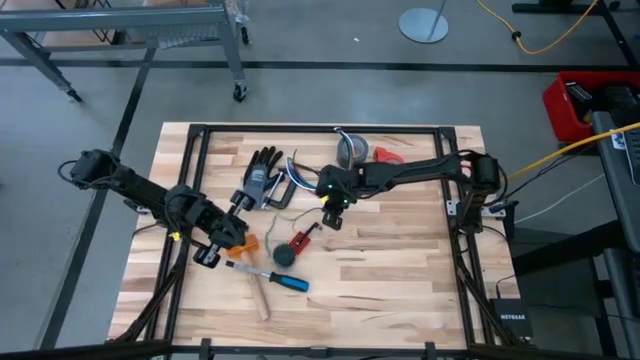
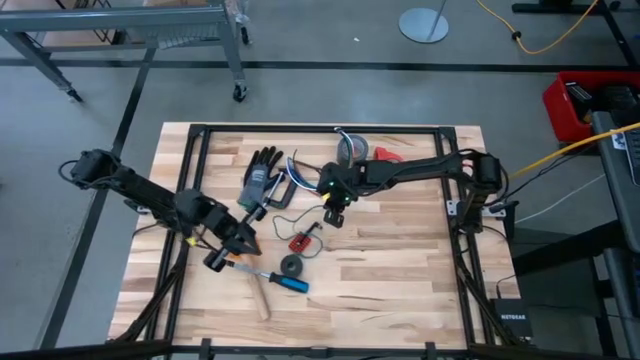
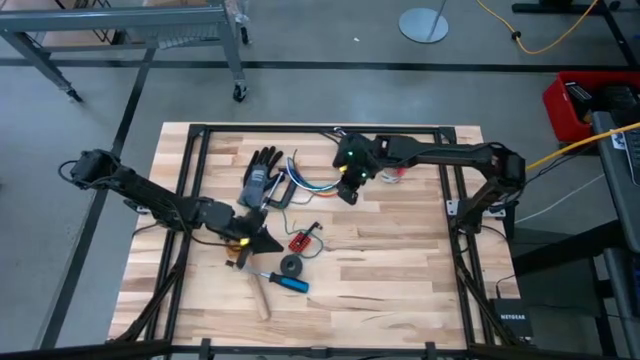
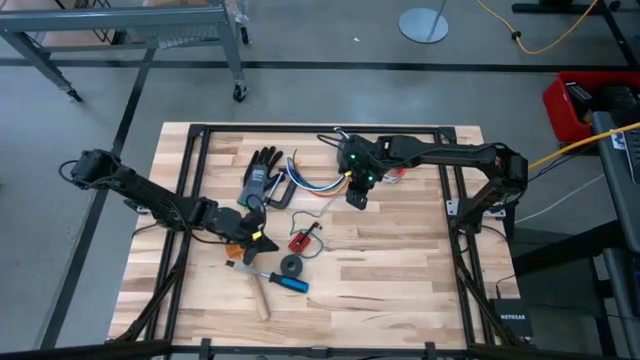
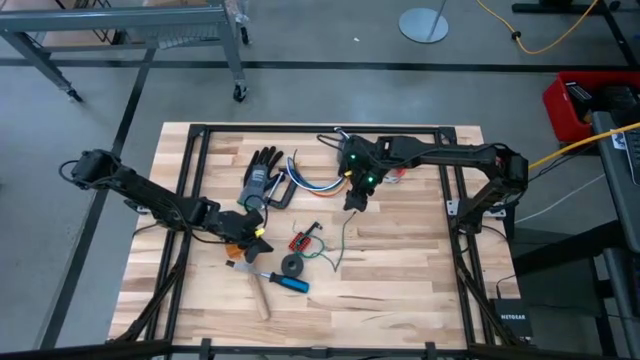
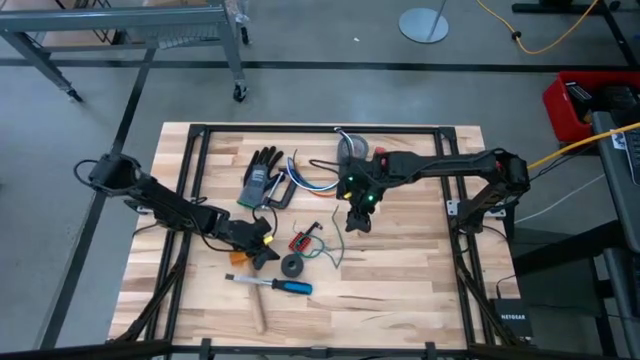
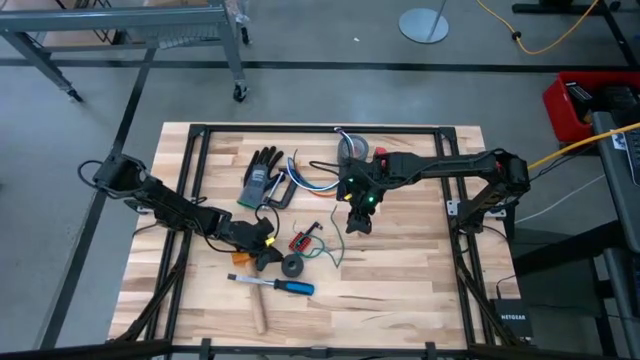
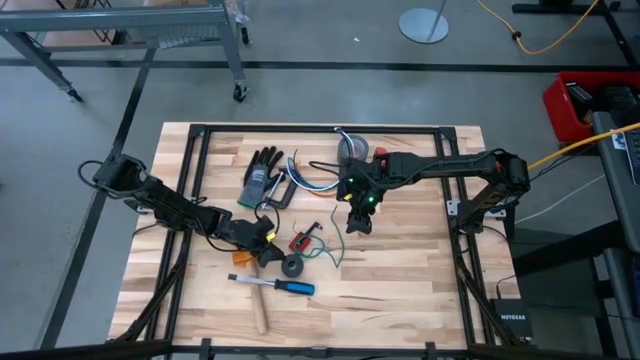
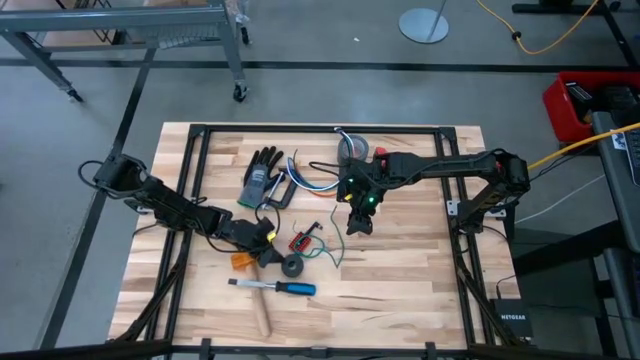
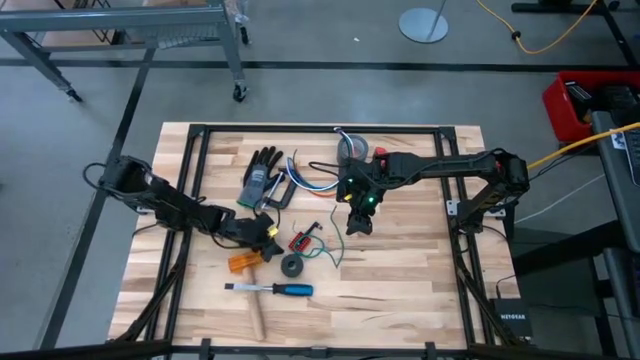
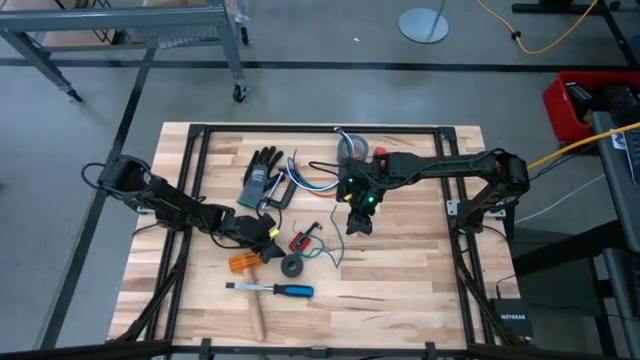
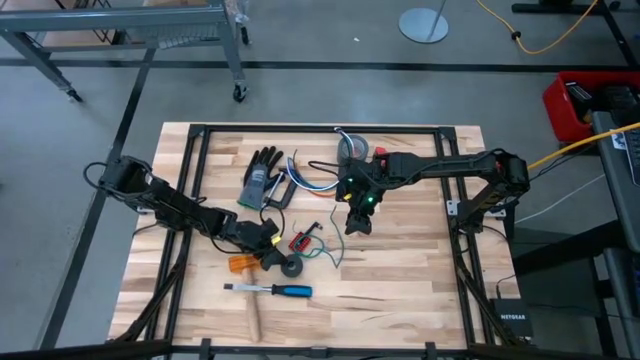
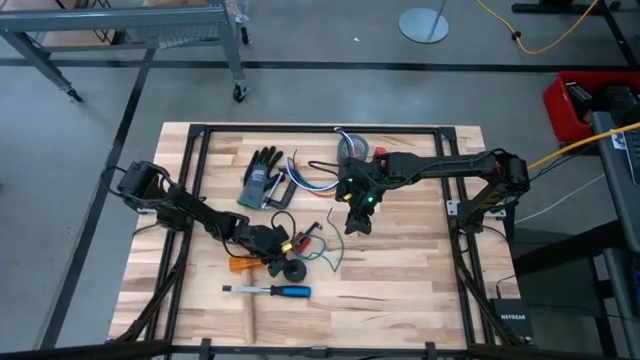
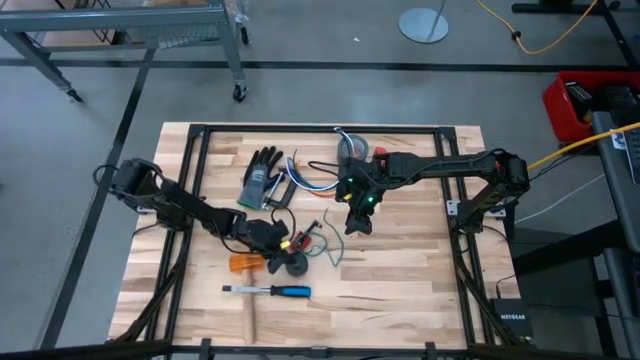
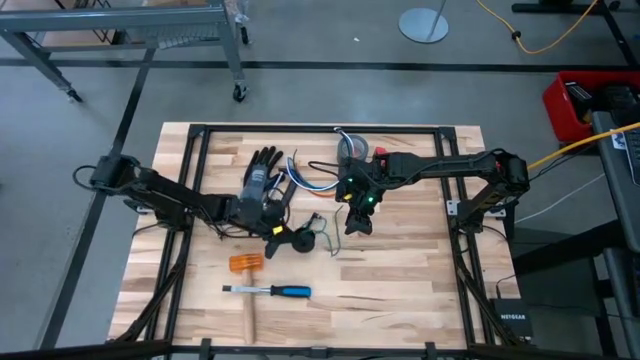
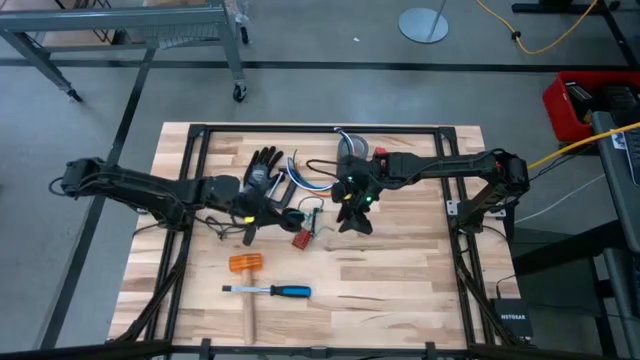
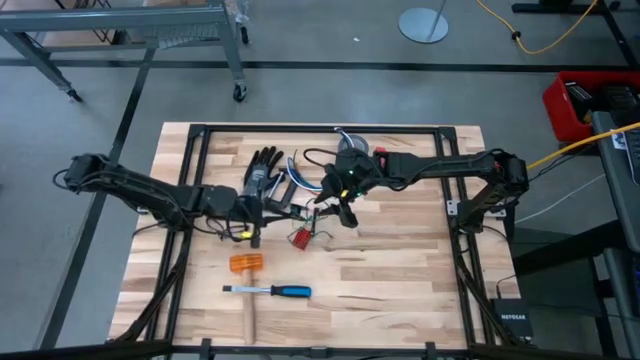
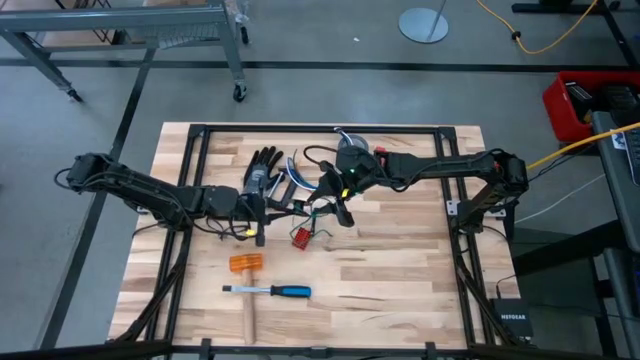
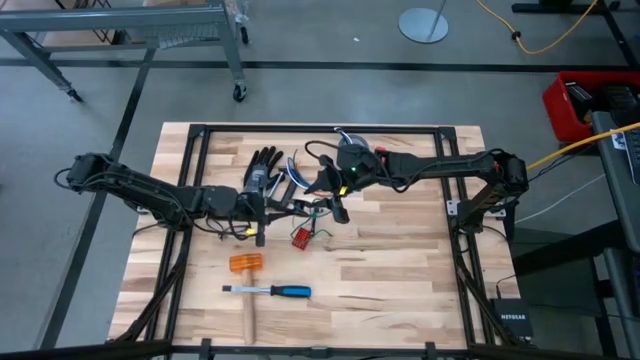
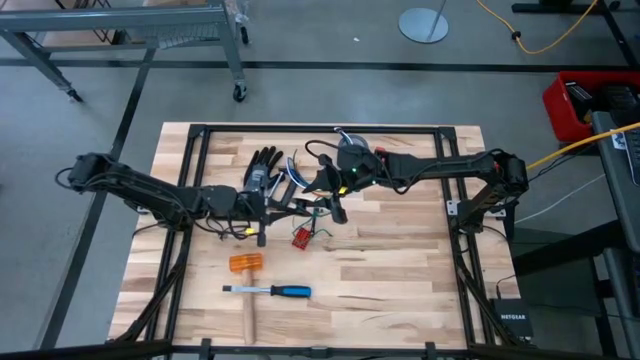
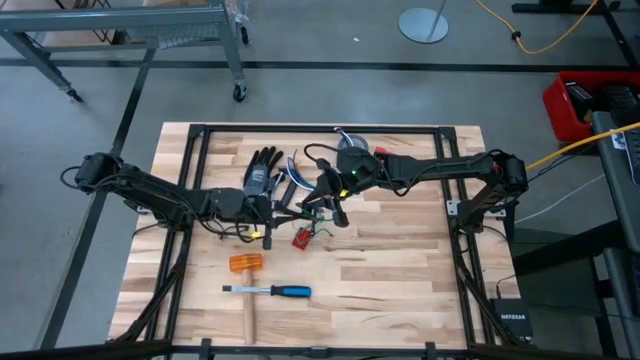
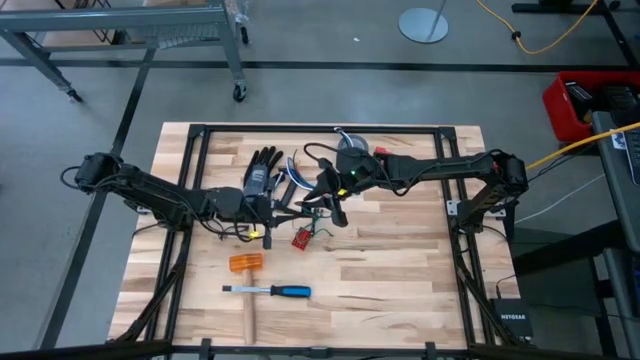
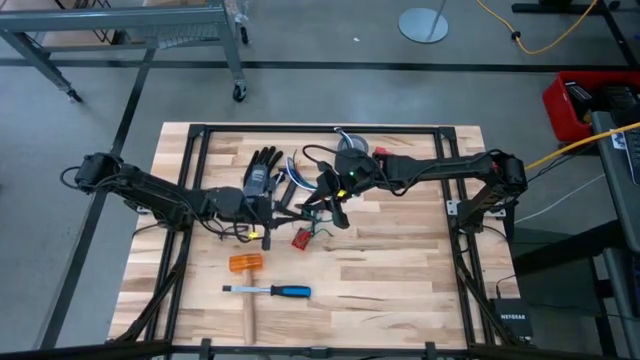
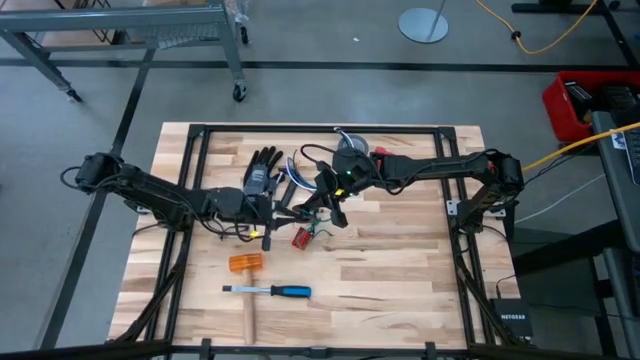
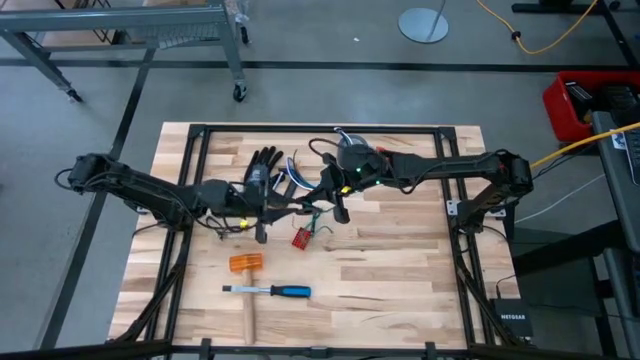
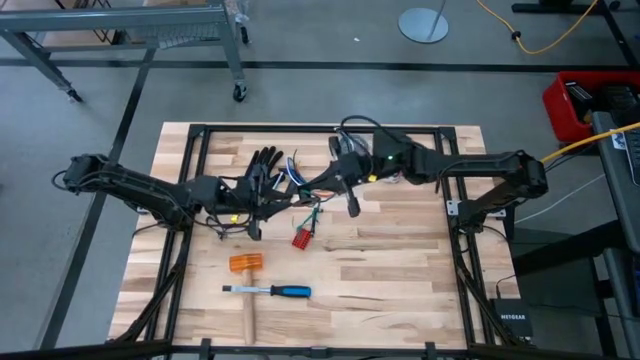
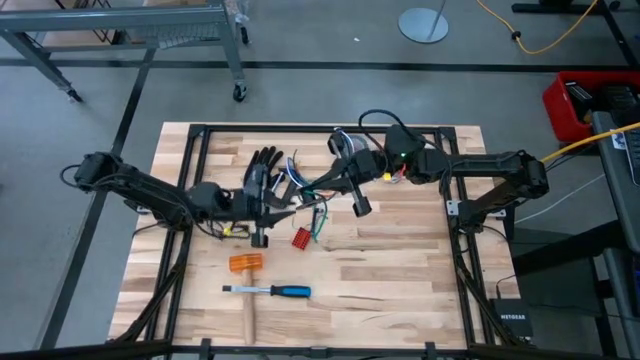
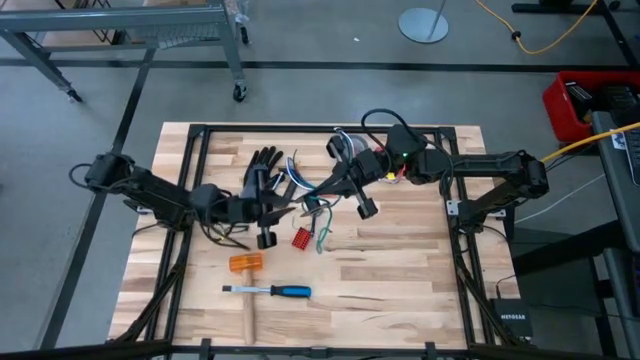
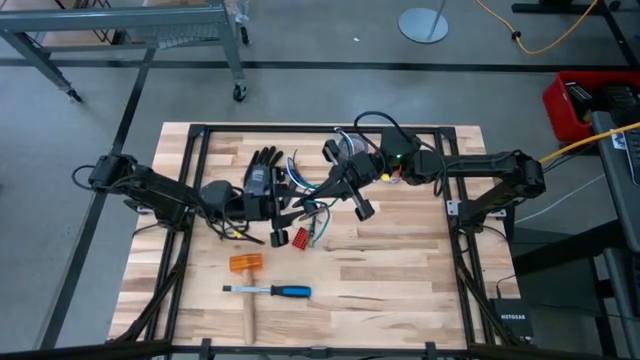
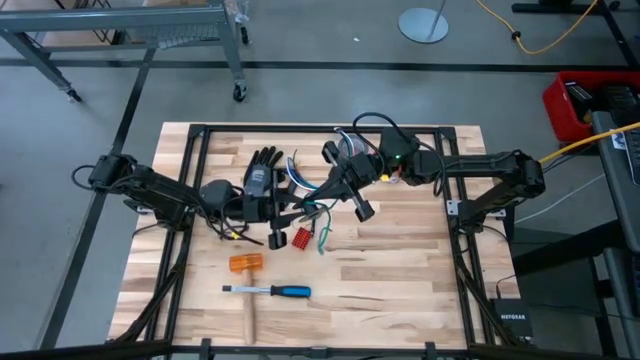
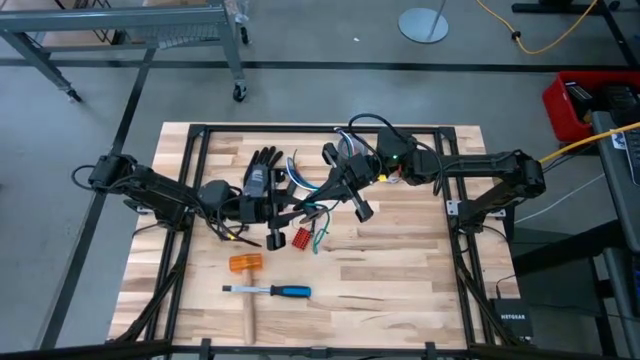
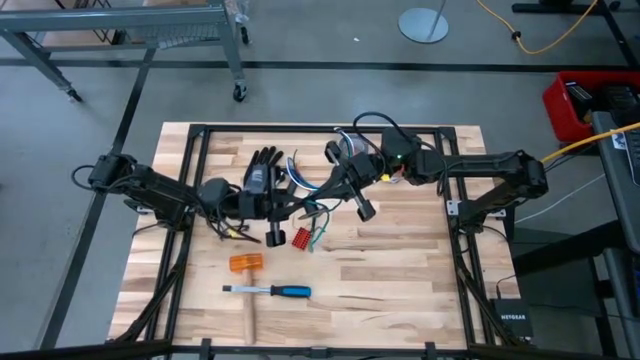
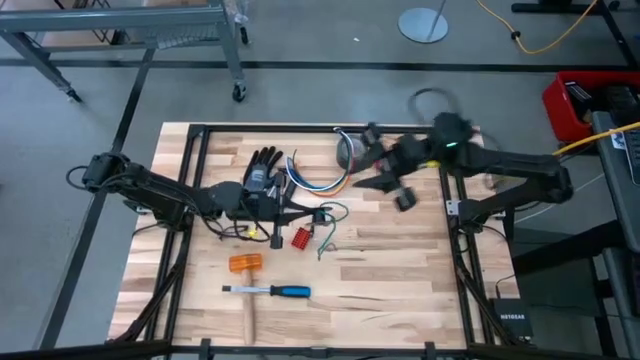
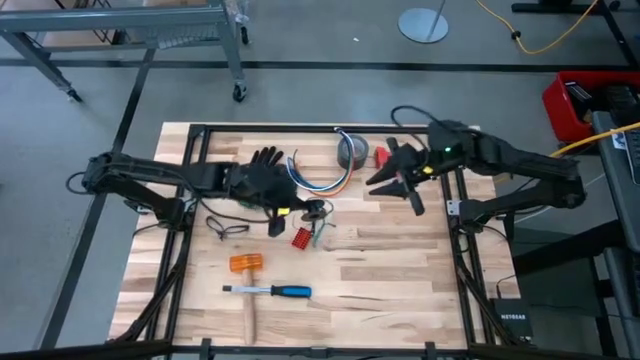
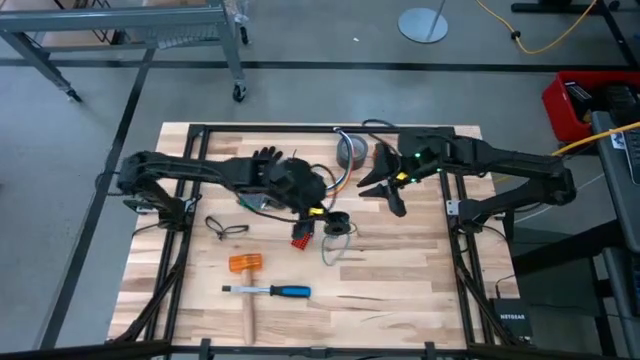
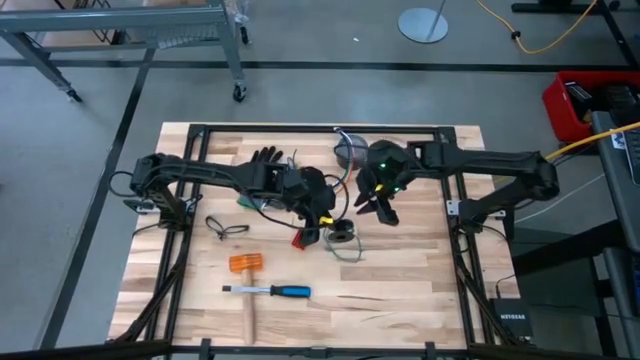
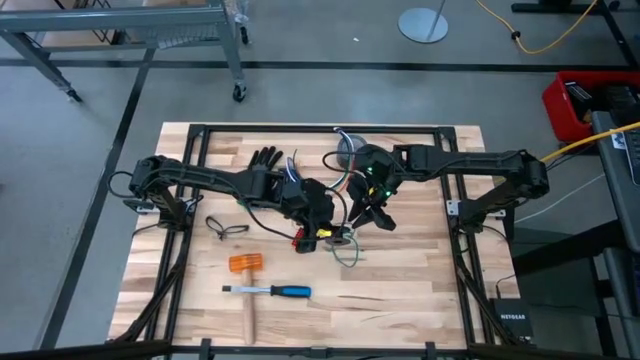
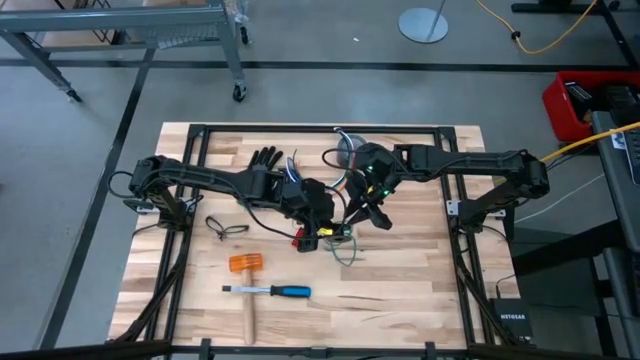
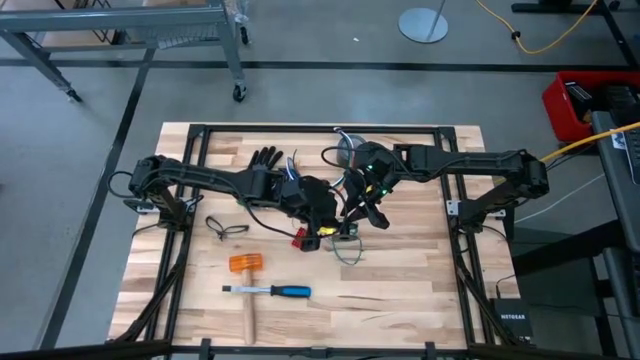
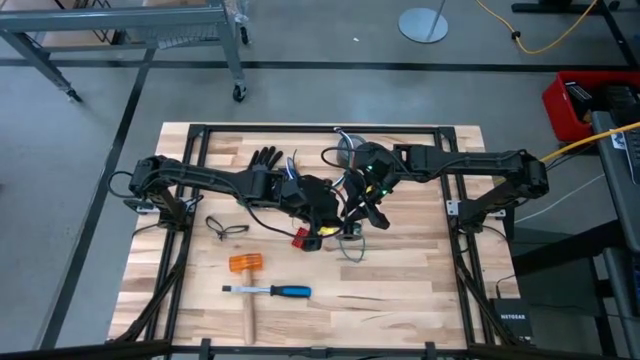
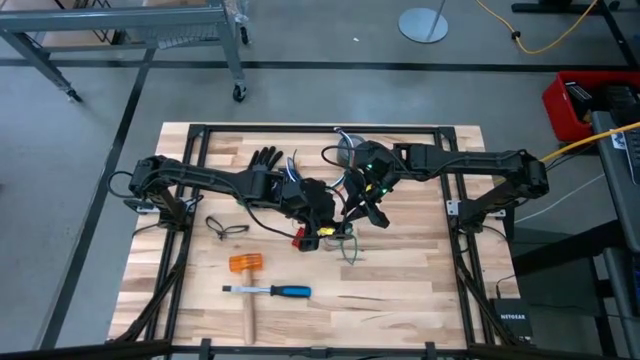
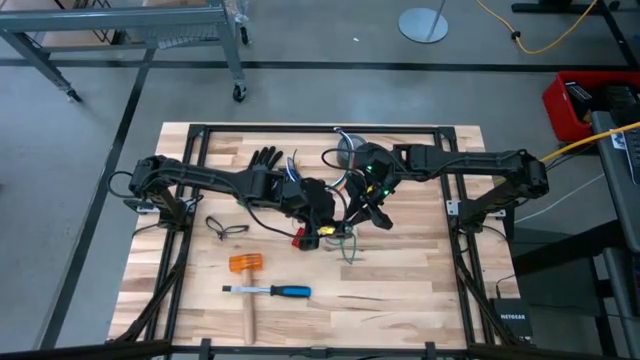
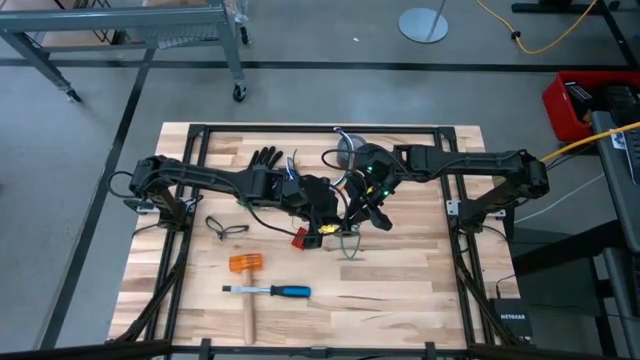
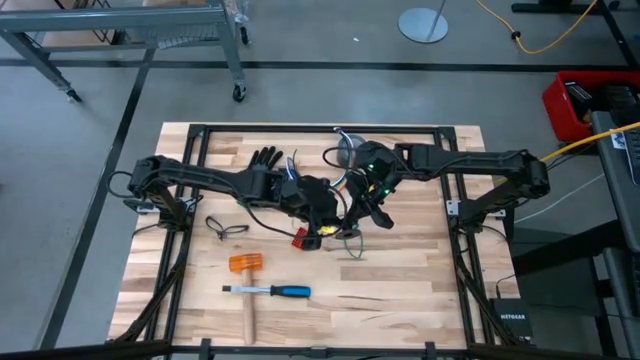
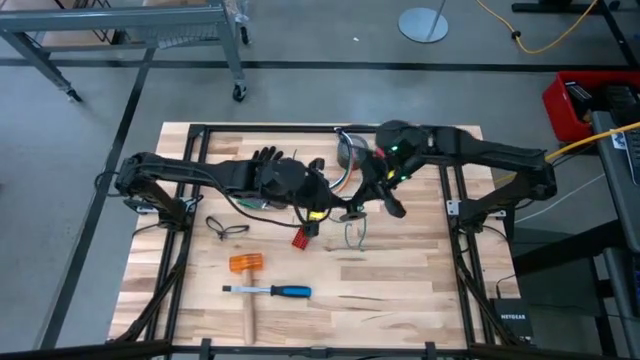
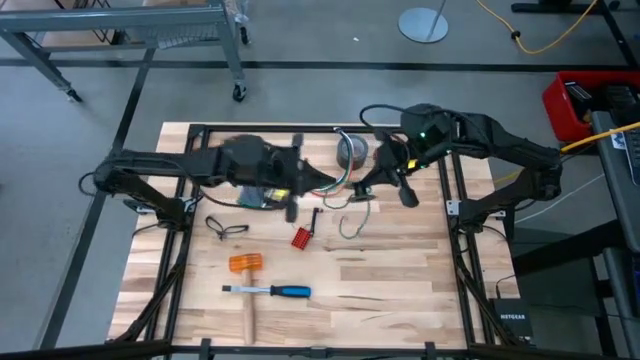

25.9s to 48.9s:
Task: Coil cords
Uncoil the green wire from the black spool
